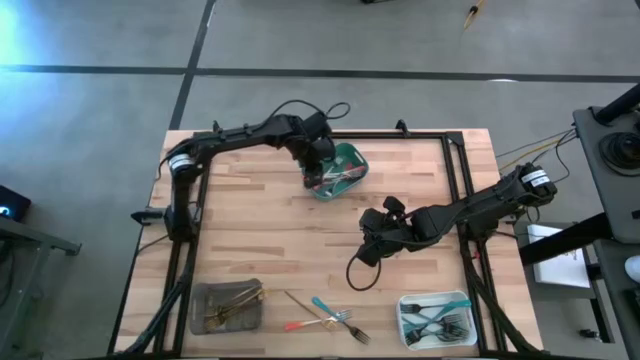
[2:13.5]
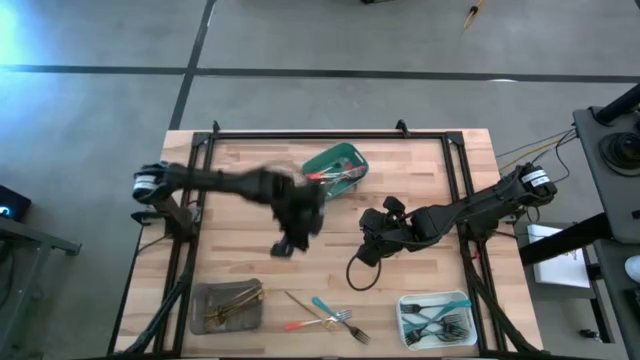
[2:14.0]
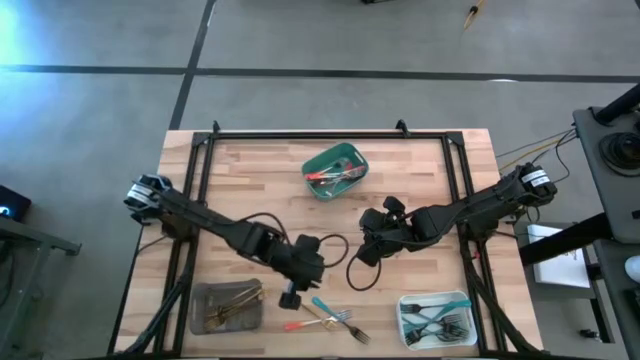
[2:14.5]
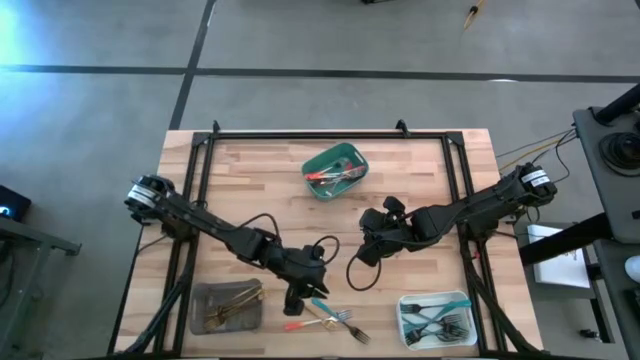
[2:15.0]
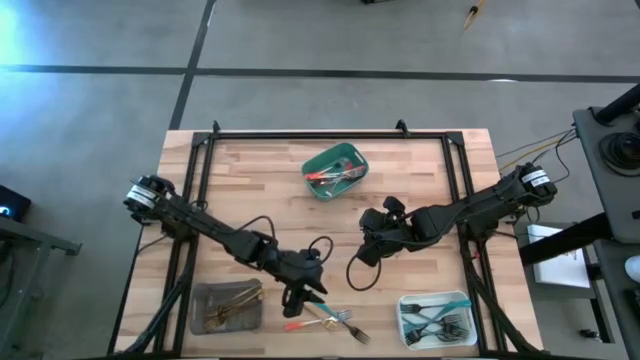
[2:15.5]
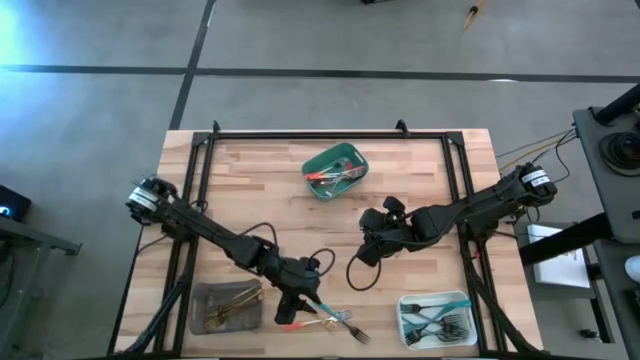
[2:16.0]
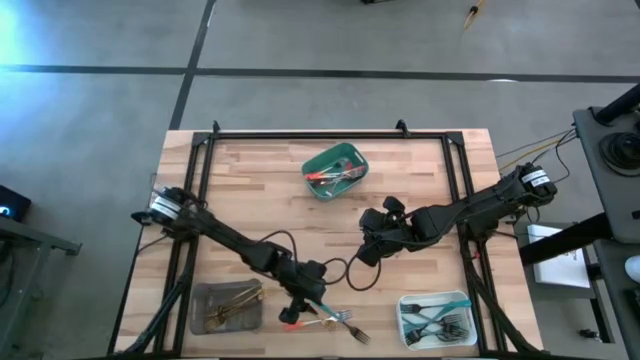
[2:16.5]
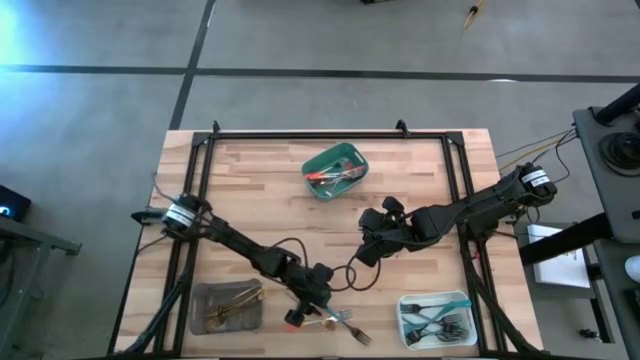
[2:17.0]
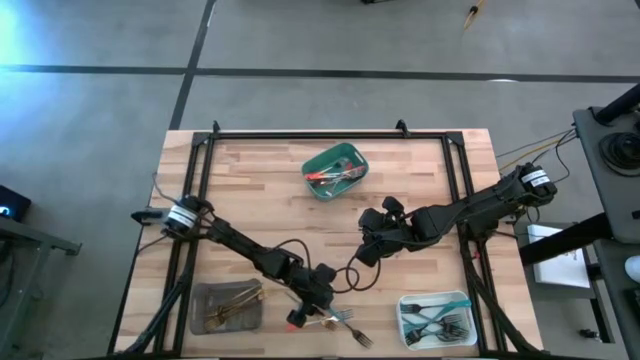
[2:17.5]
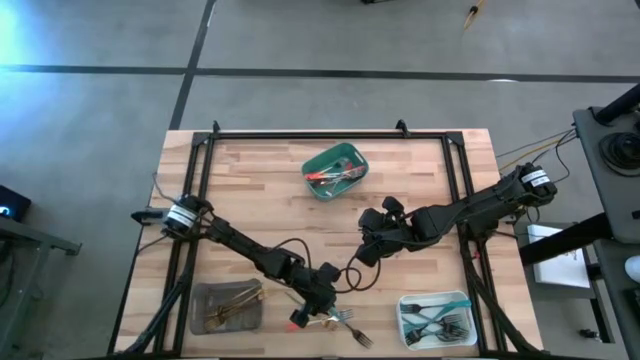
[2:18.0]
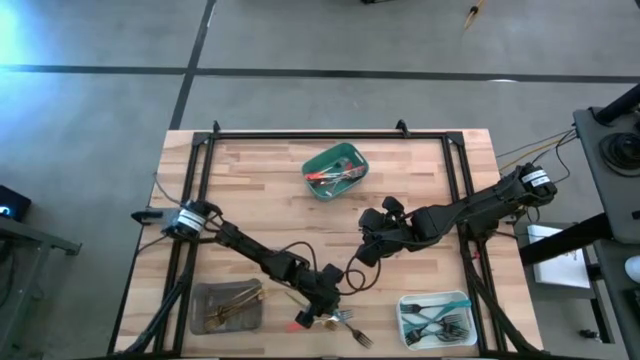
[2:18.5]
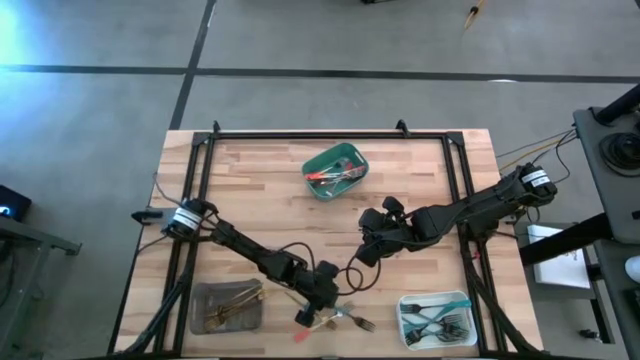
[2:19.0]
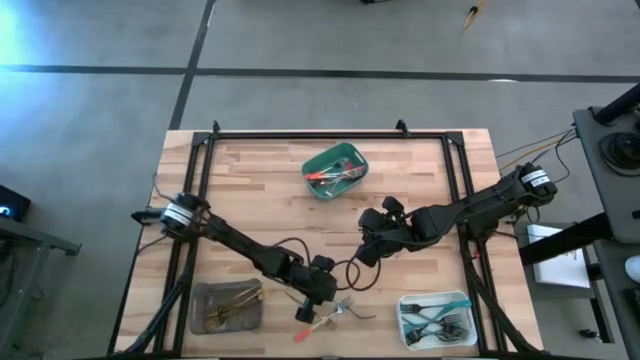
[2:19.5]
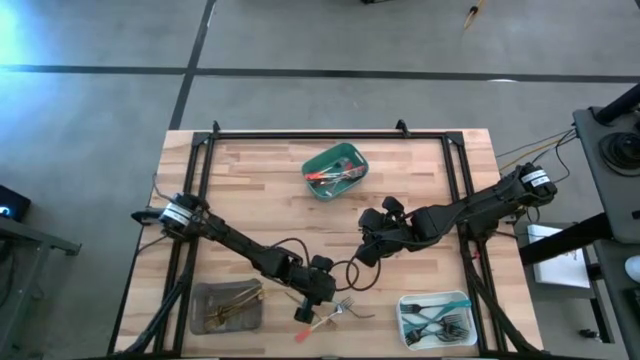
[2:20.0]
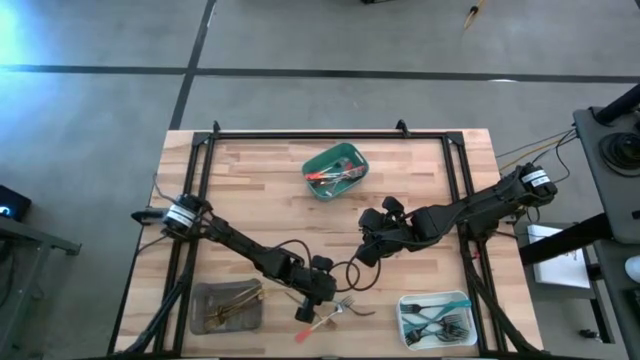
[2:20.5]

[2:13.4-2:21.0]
Task: Sort silverware by color (type)
Put the blue fork into the white bin

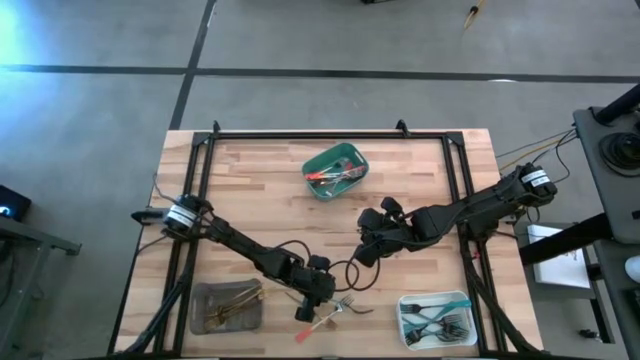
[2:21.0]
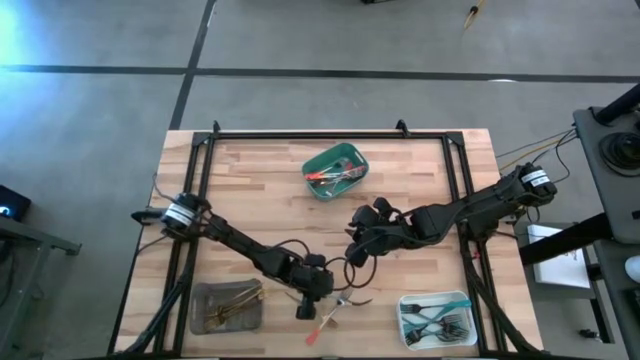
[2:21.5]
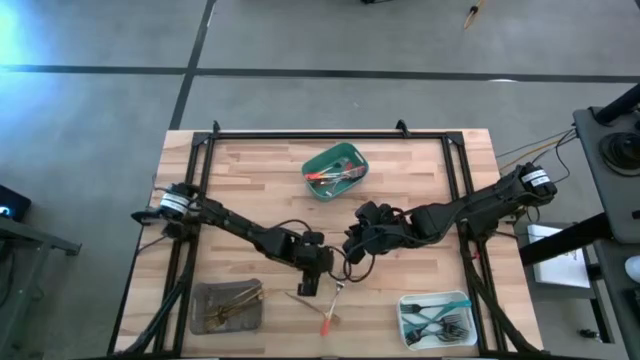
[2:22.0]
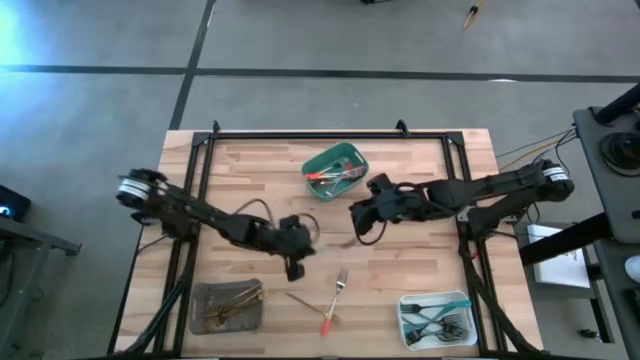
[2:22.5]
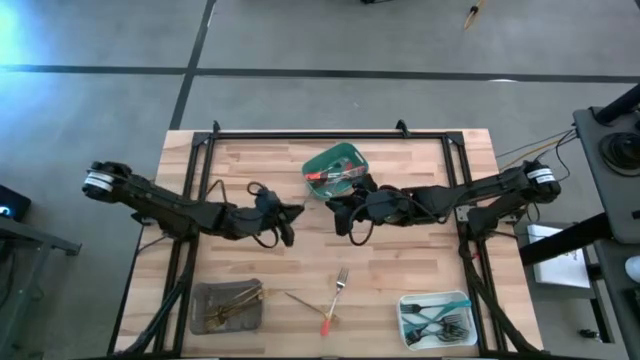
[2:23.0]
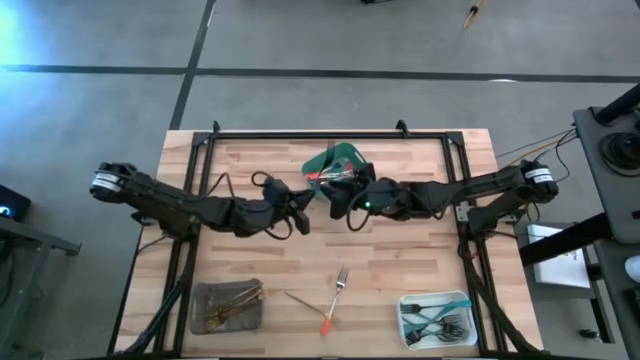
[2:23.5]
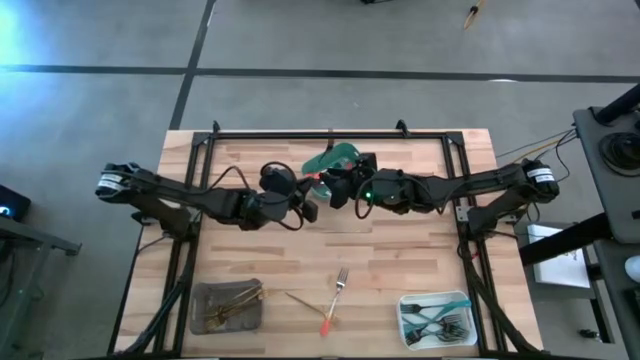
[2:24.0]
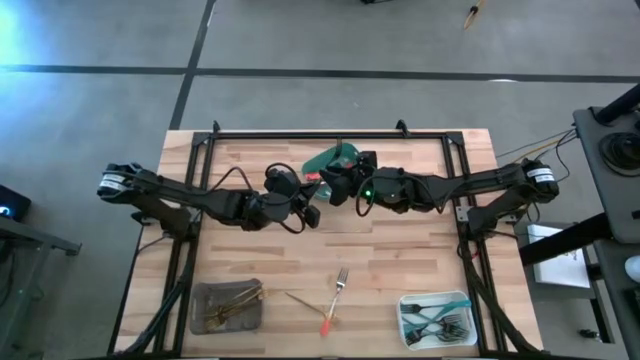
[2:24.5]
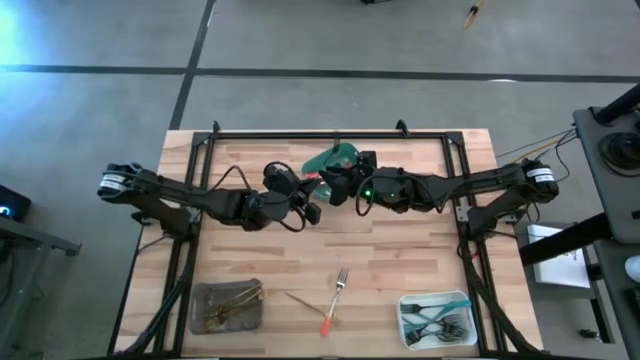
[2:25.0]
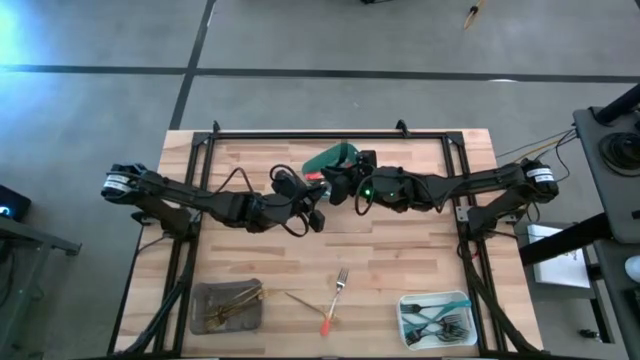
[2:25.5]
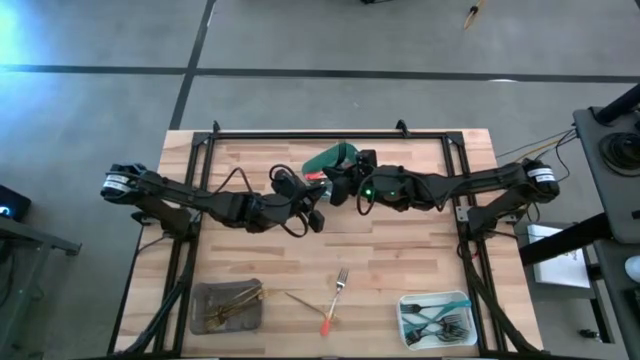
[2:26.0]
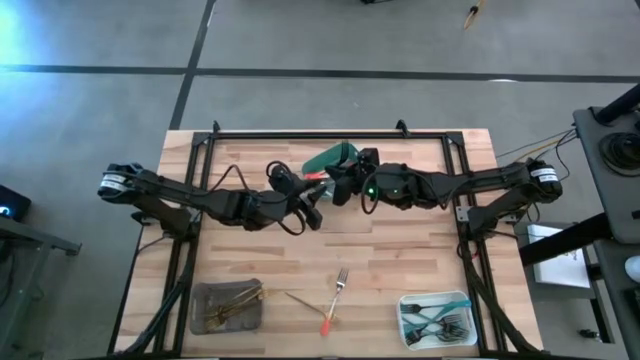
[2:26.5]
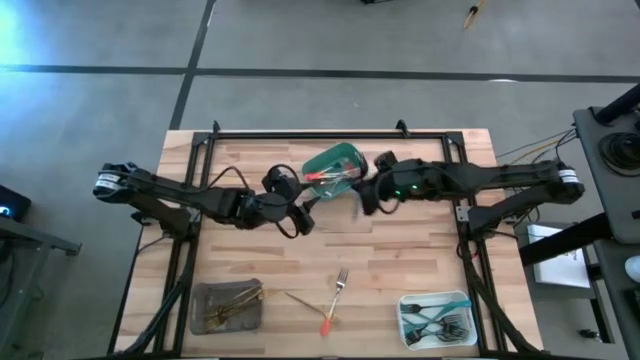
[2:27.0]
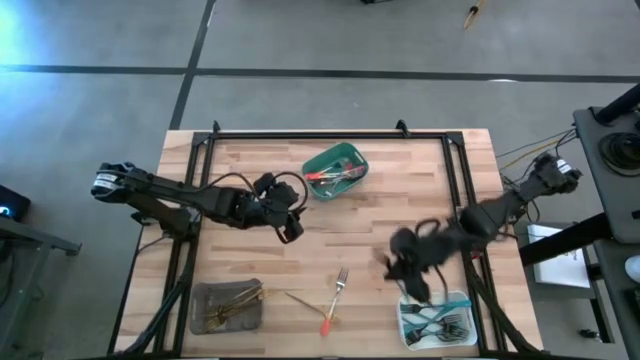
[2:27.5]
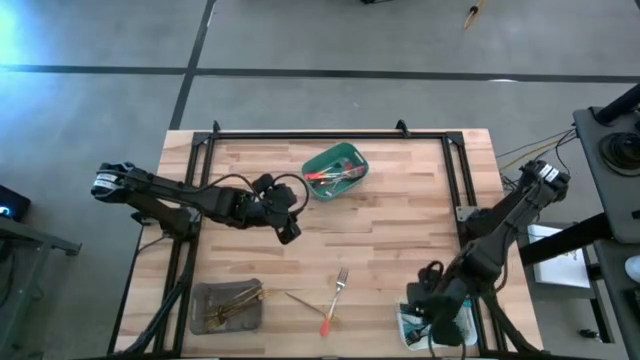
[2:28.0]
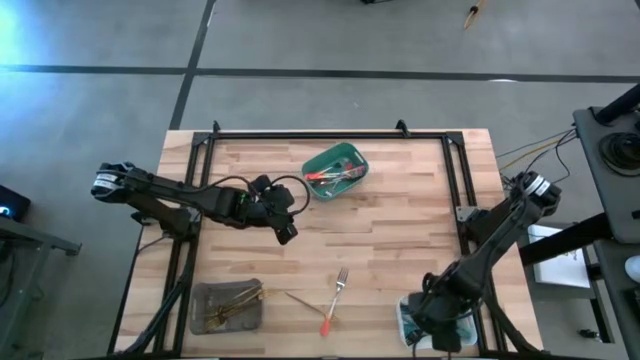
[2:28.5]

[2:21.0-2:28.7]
Put the blue fork into the white bin

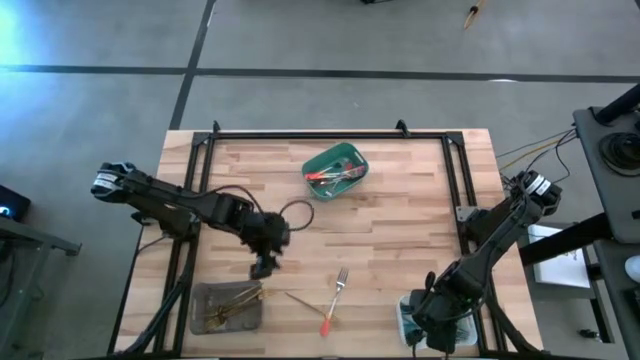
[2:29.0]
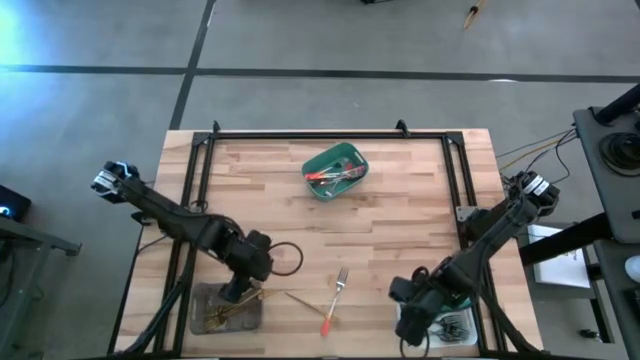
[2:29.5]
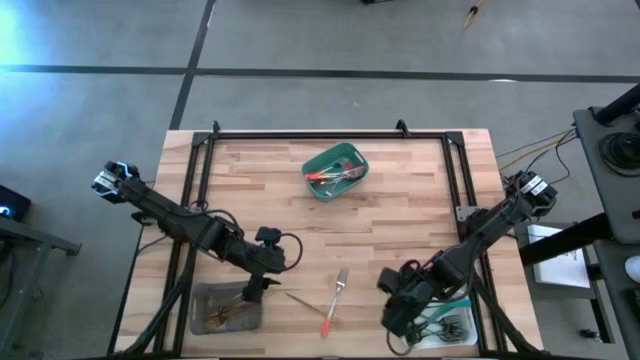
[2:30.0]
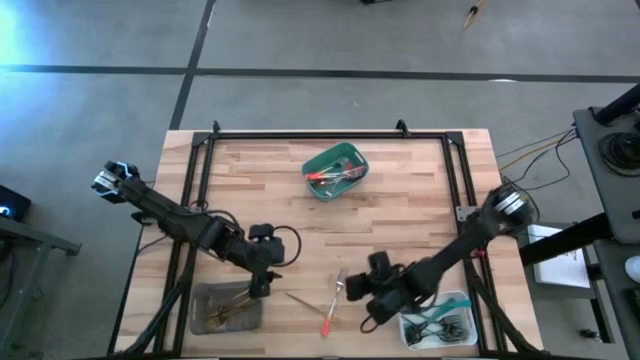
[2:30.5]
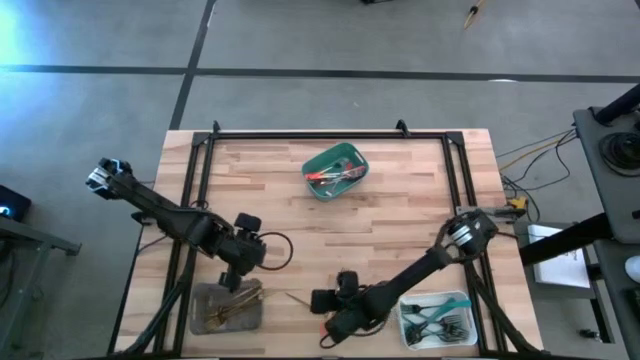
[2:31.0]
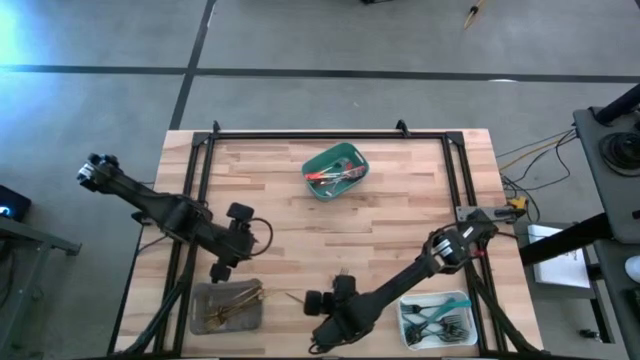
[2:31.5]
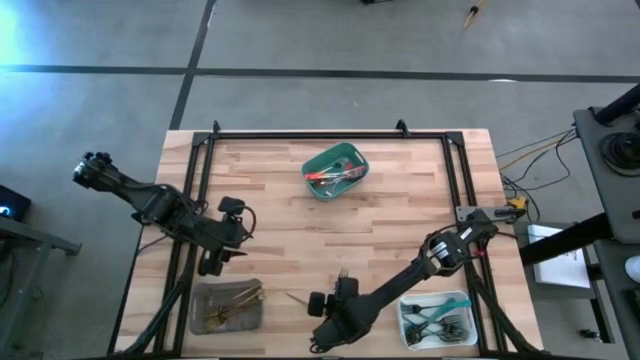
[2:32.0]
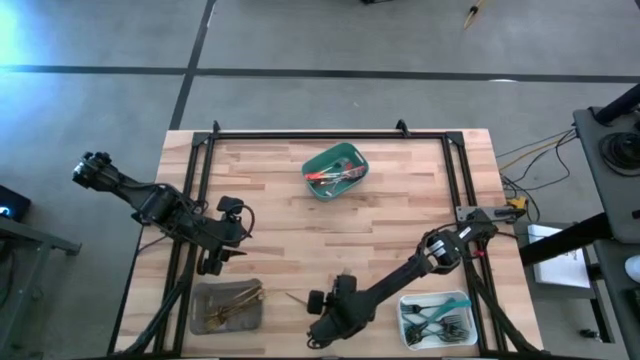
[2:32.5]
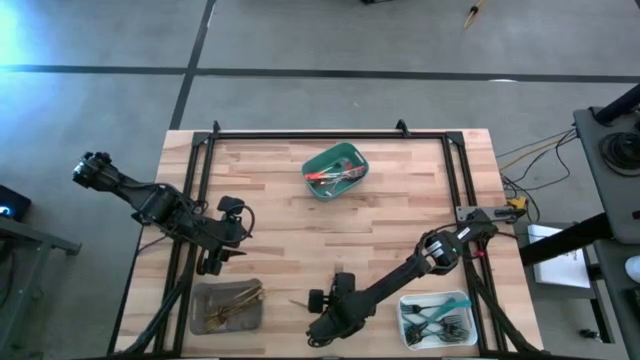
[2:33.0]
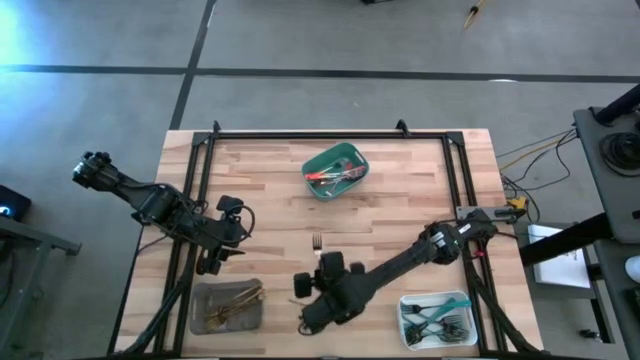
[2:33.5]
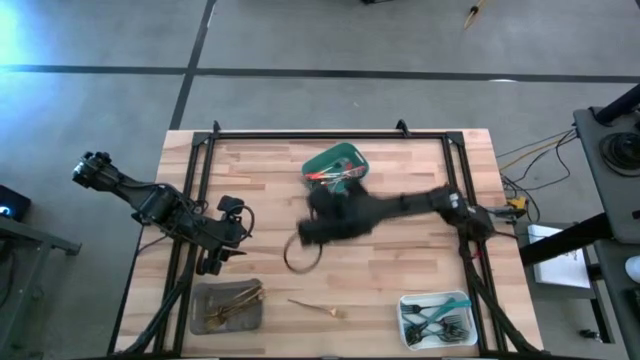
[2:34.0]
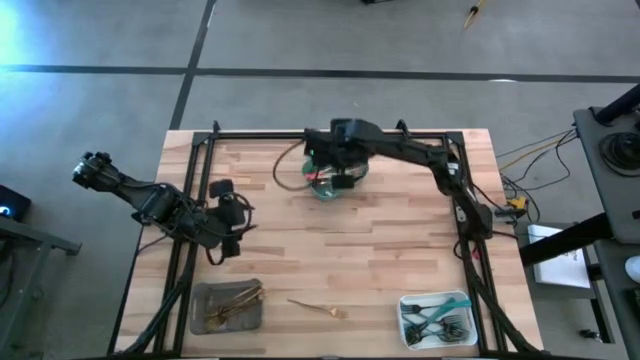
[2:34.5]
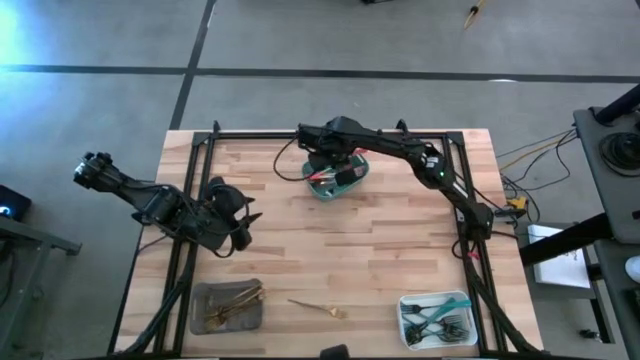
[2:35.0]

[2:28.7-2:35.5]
Put the orange fork into the green bin
